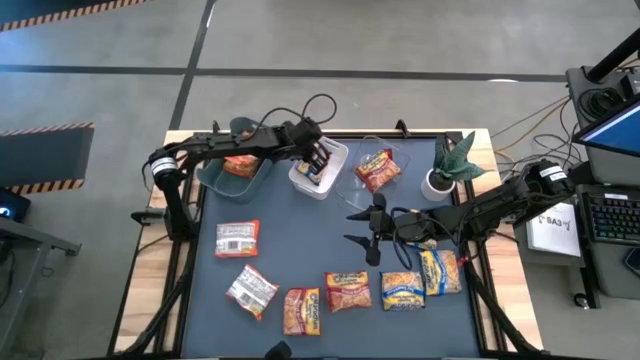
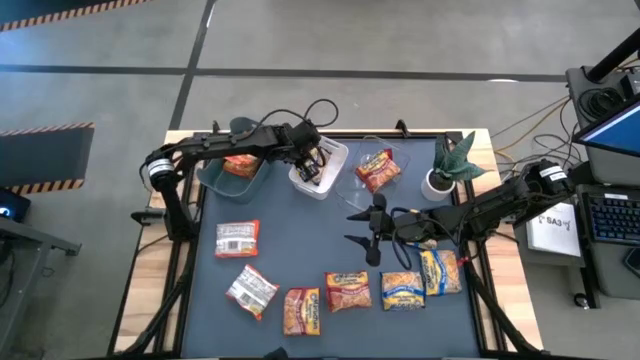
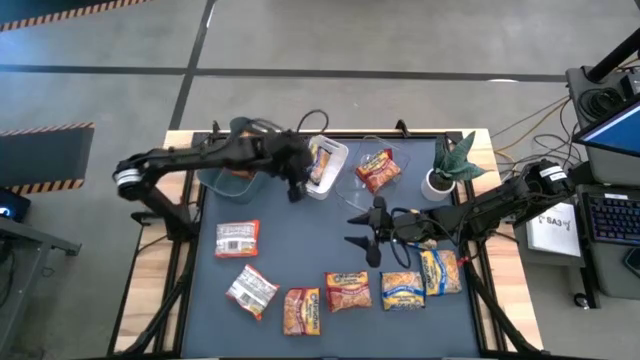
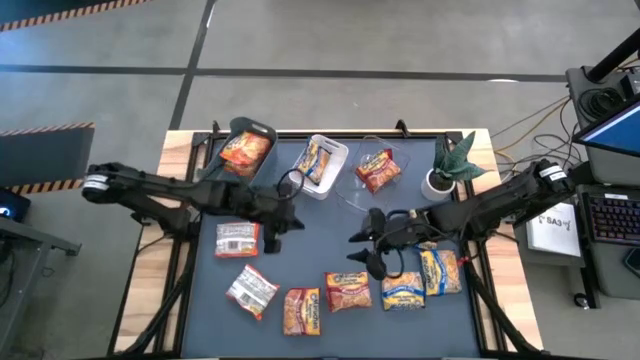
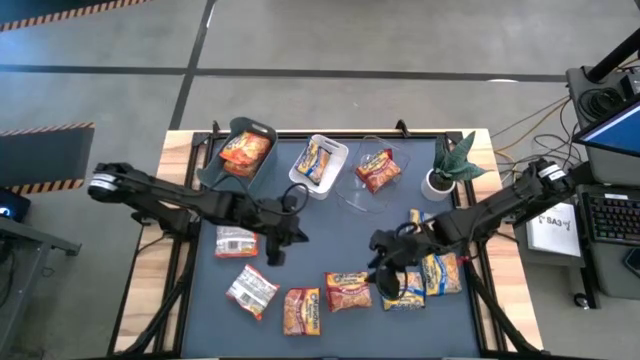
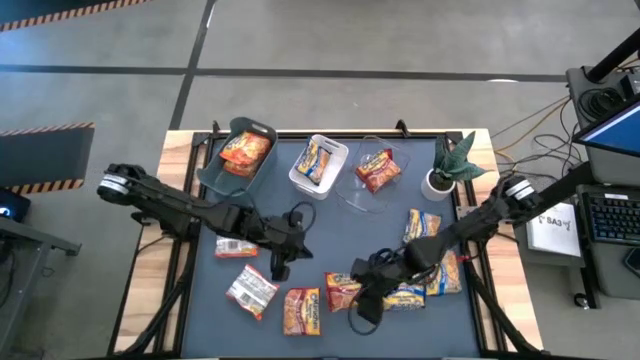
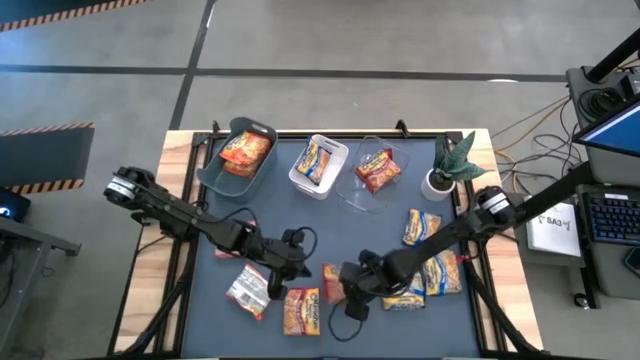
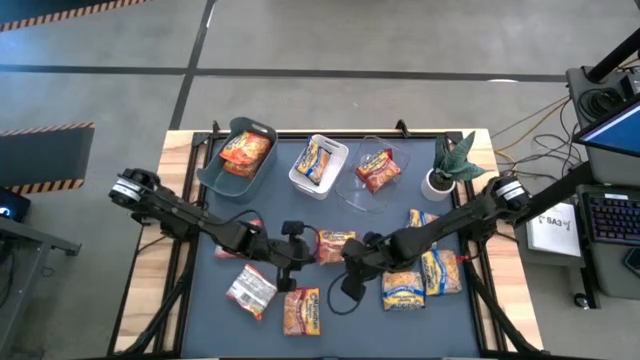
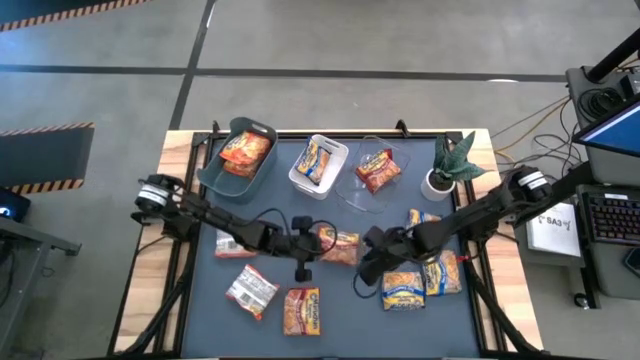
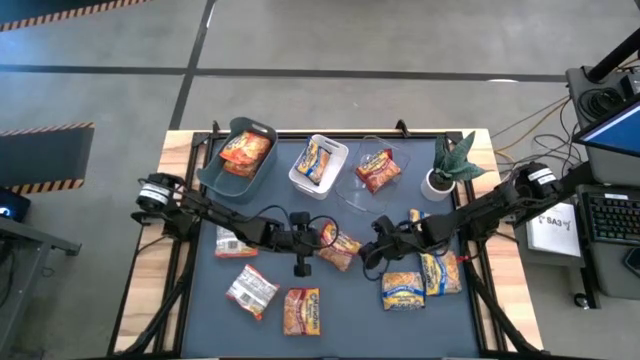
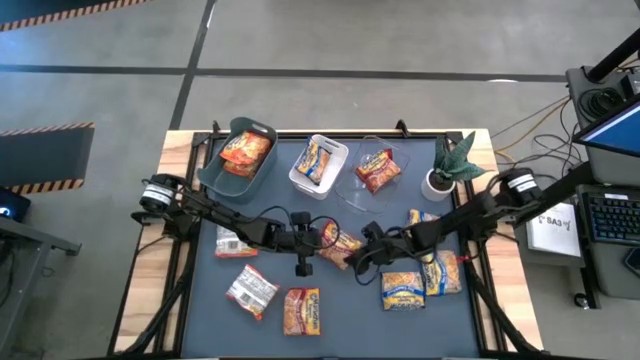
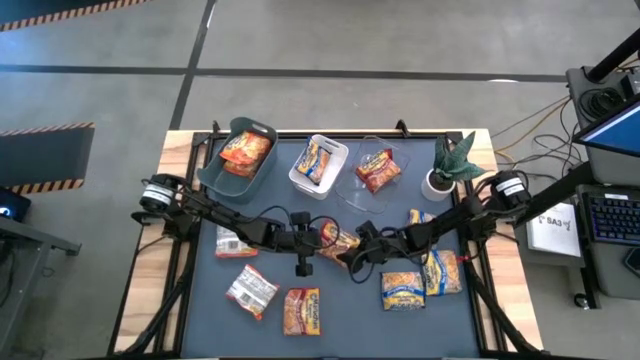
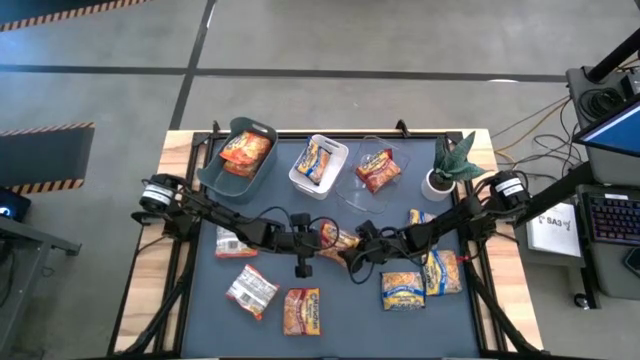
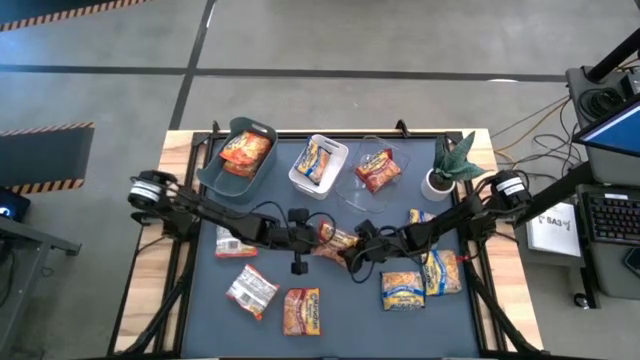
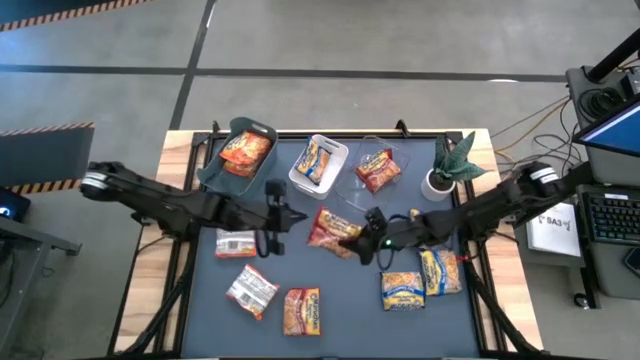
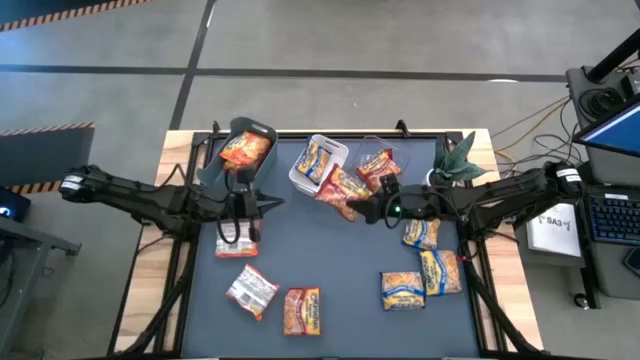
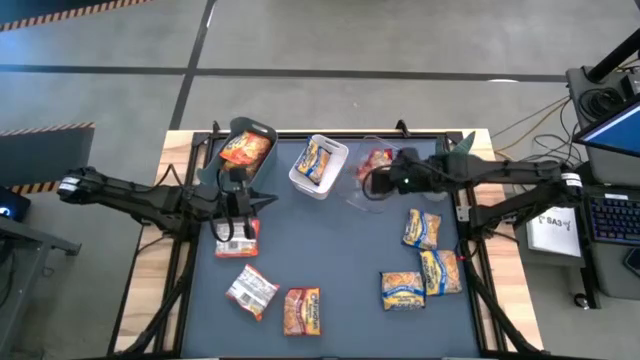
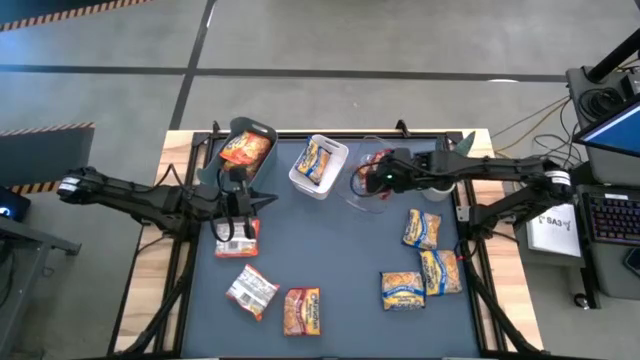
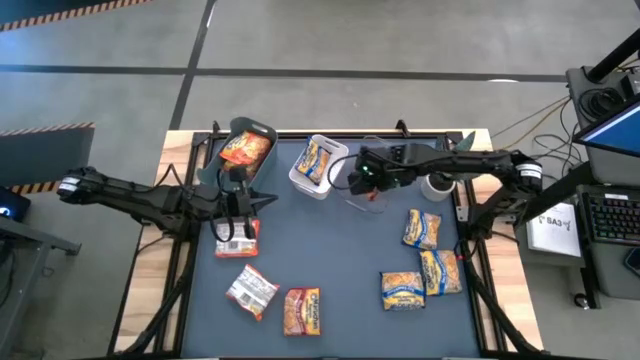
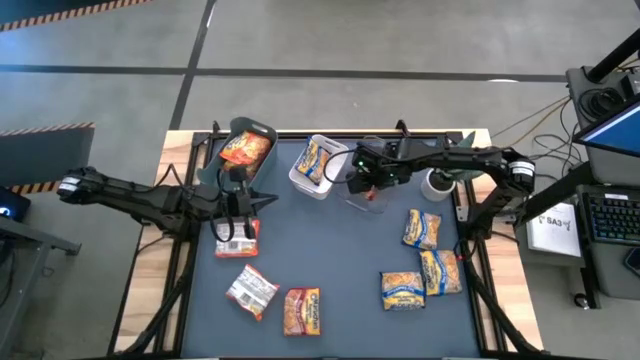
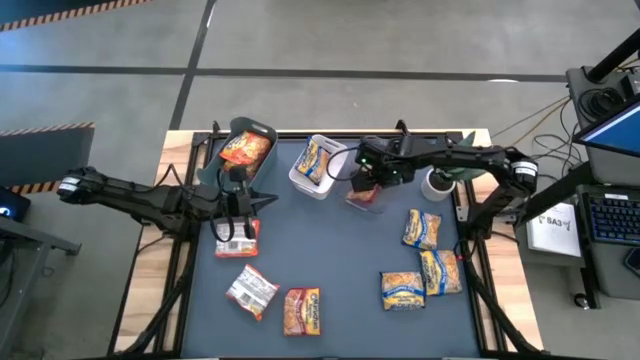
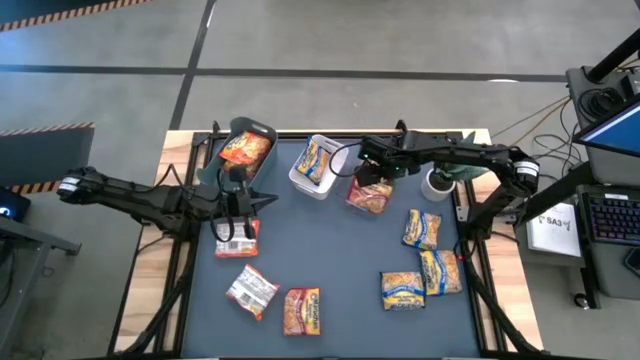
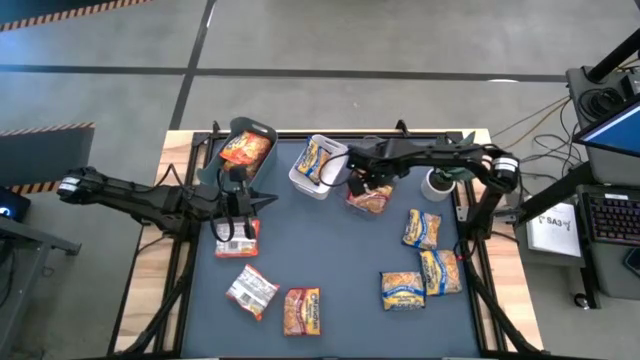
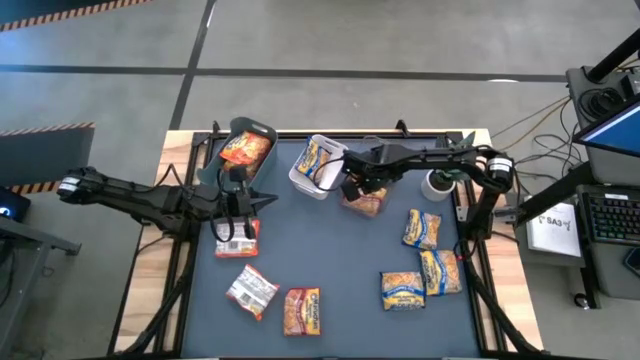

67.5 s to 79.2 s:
Task: Sort Maruchan noodles
Put the red noodle pack into the transparent bin

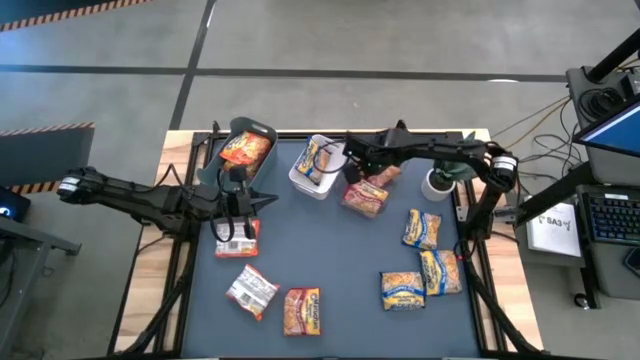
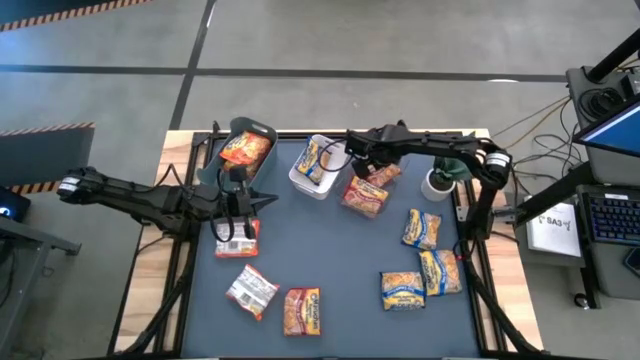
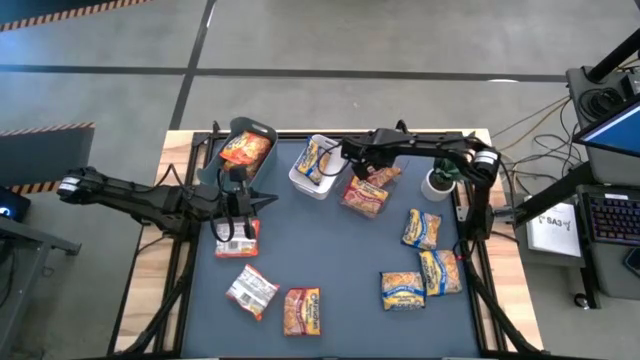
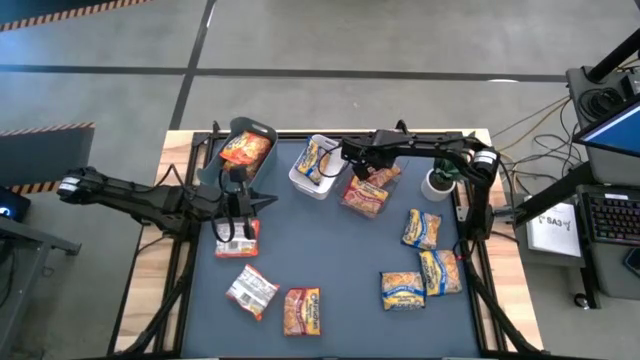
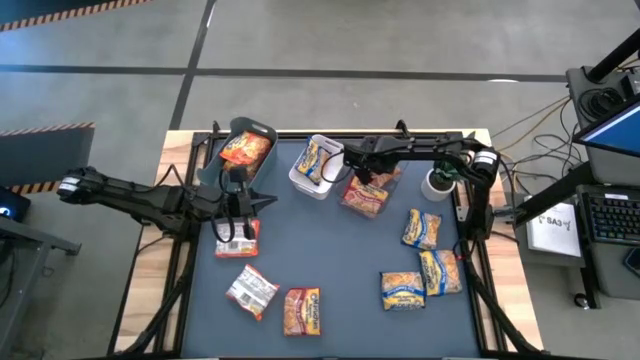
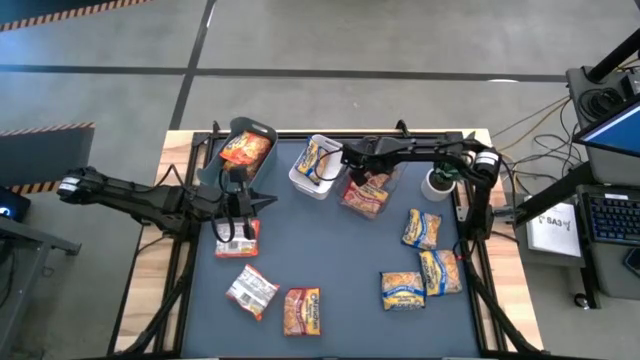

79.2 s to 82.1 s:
Adjust the red noodle pack in the transparent bin

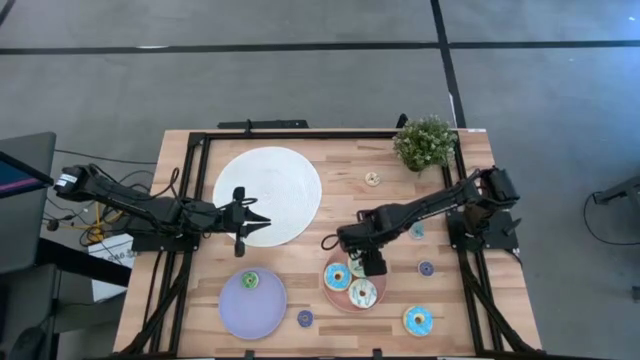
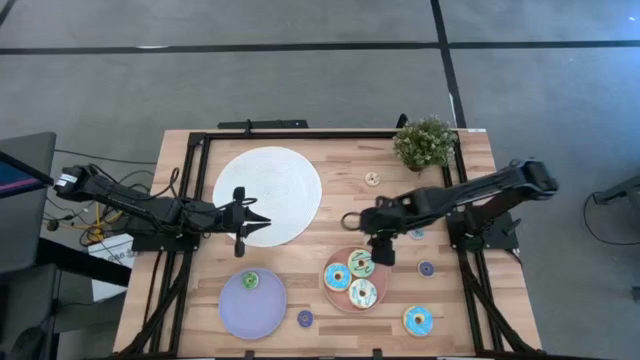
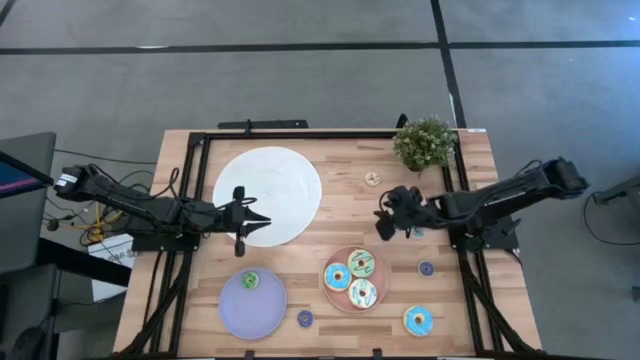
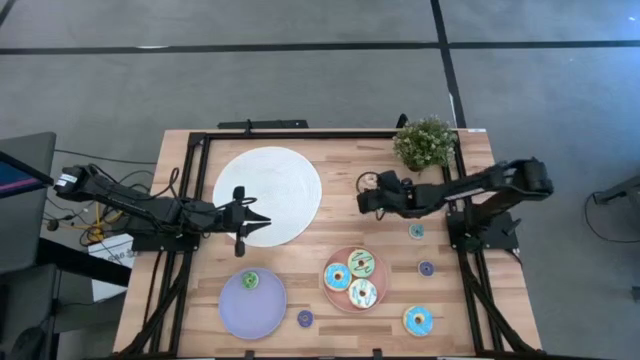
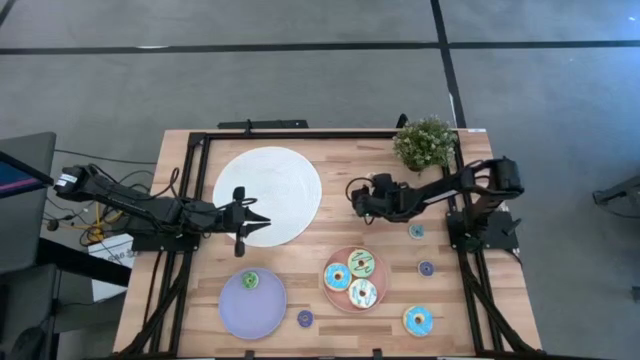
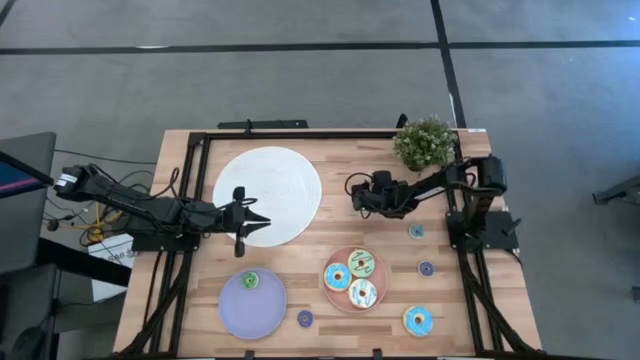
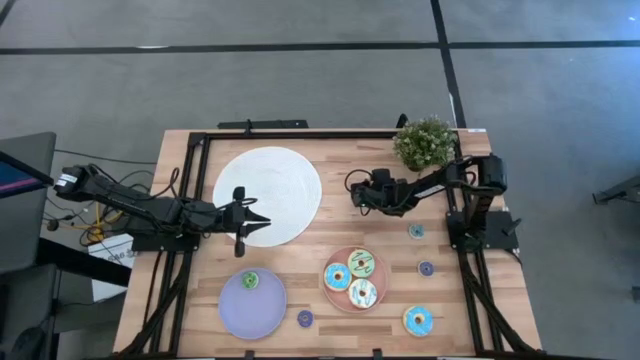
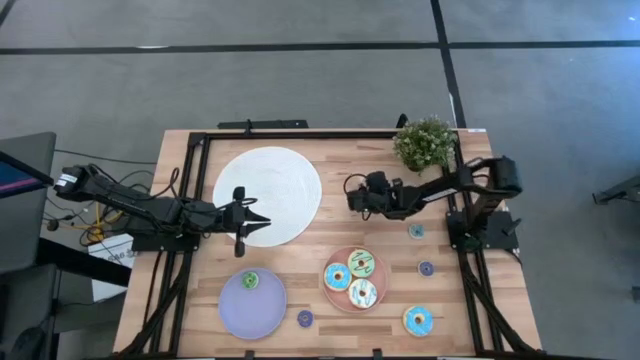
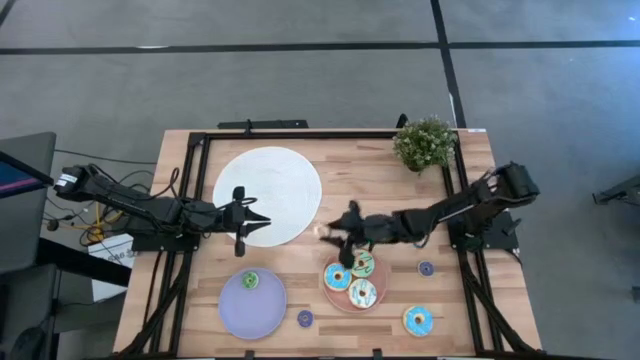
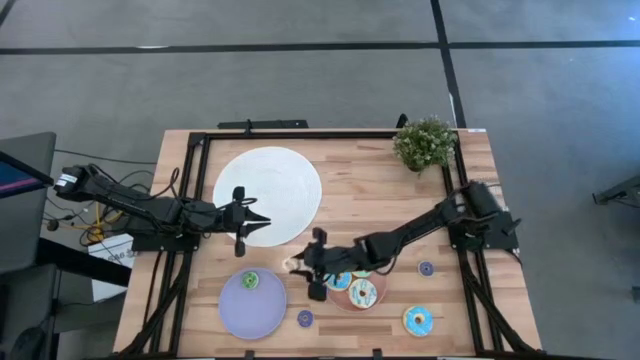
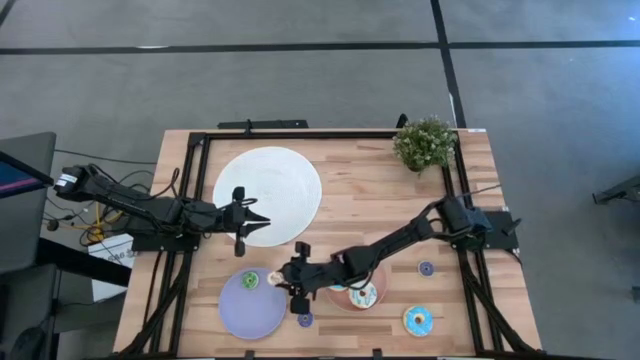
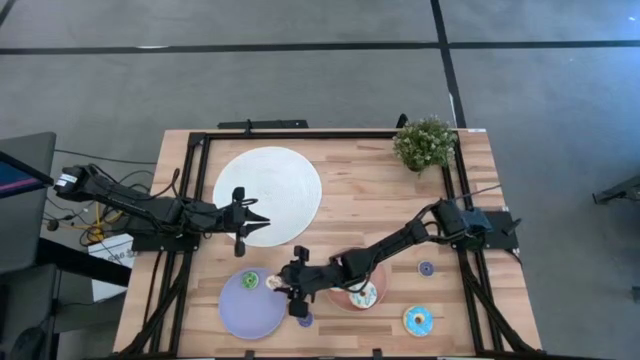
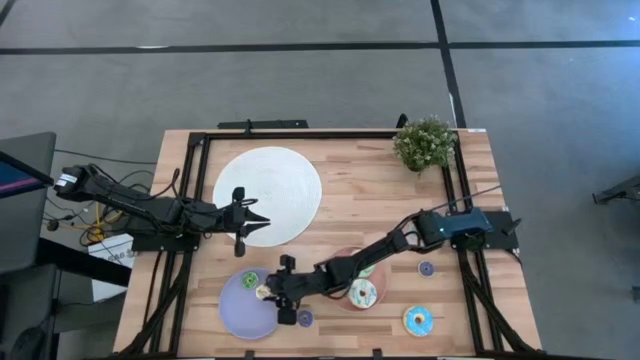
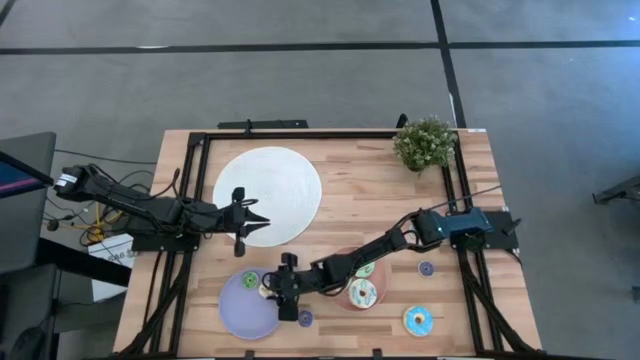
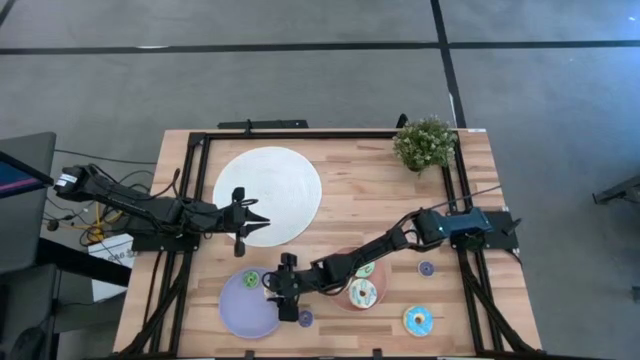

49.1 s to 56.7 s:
Task: Pick & Place donuts
Put the small white donut on the purple plate
